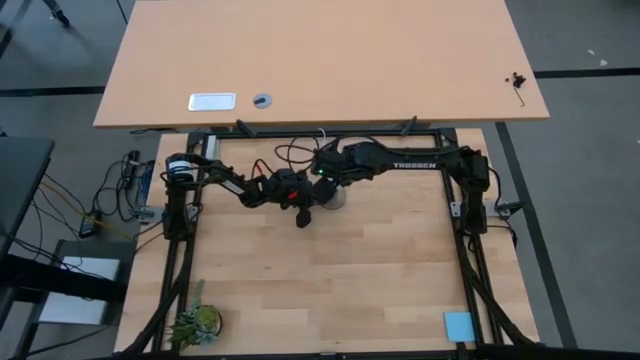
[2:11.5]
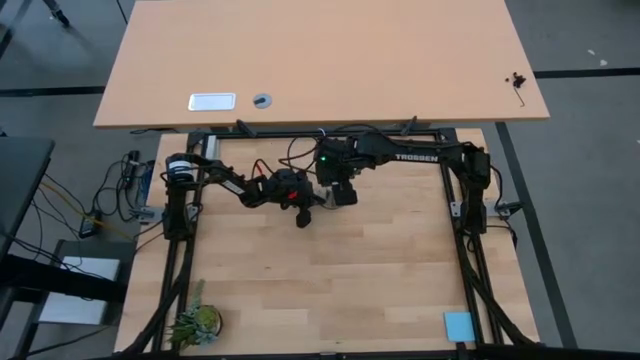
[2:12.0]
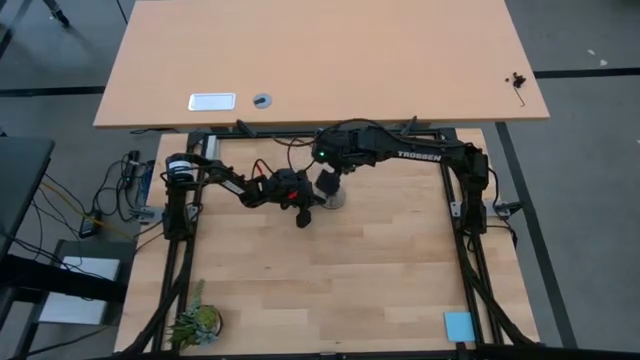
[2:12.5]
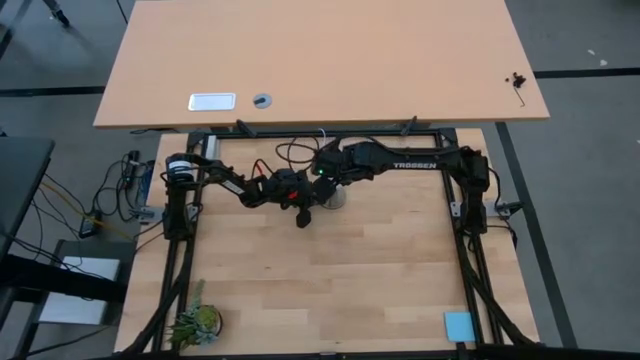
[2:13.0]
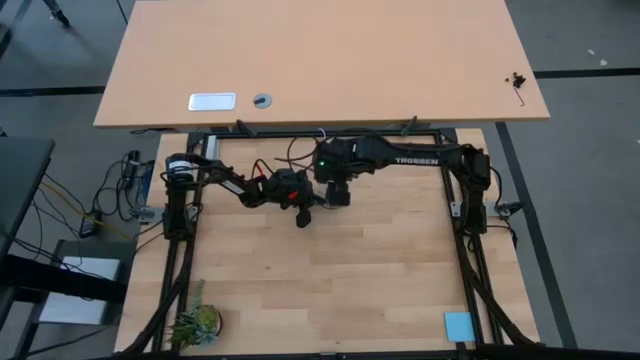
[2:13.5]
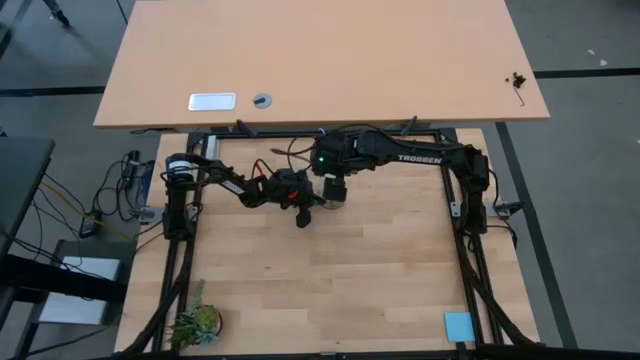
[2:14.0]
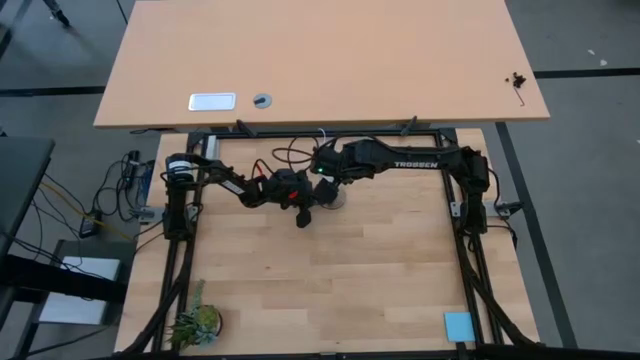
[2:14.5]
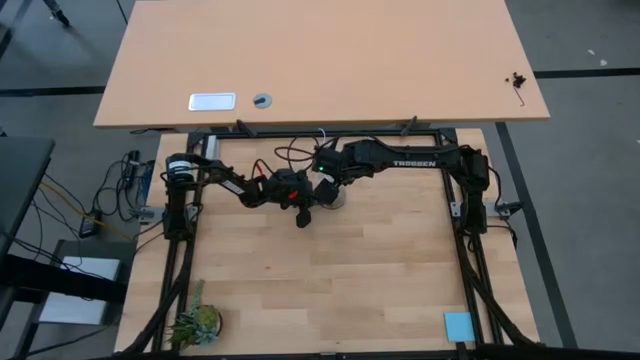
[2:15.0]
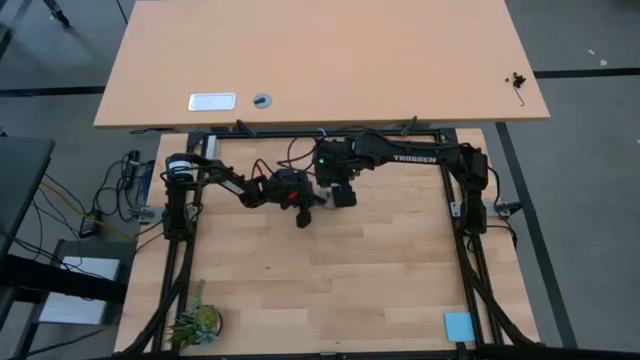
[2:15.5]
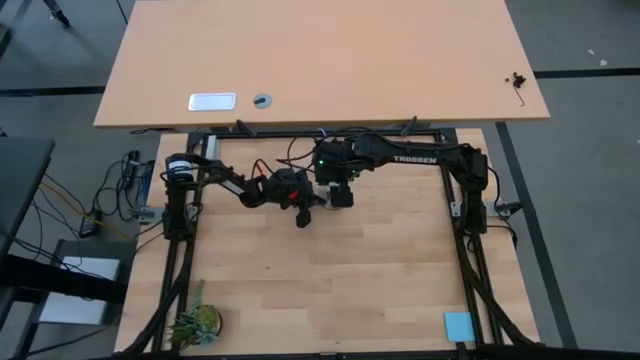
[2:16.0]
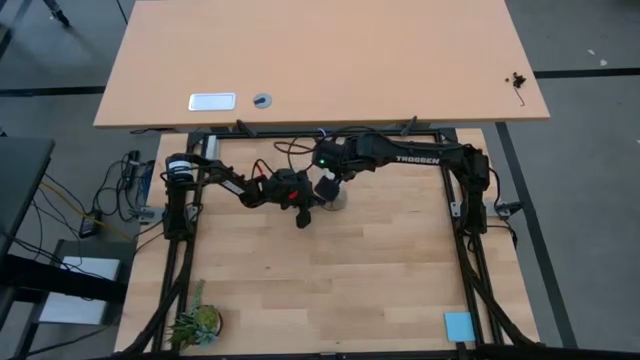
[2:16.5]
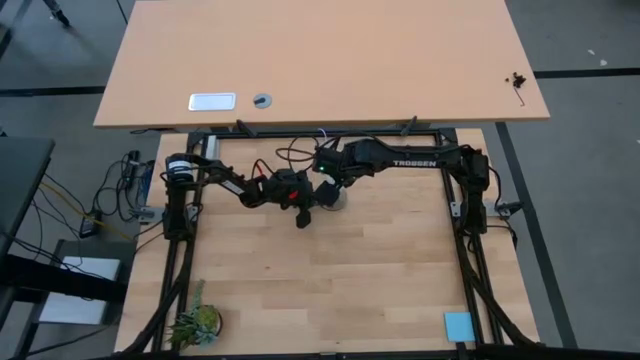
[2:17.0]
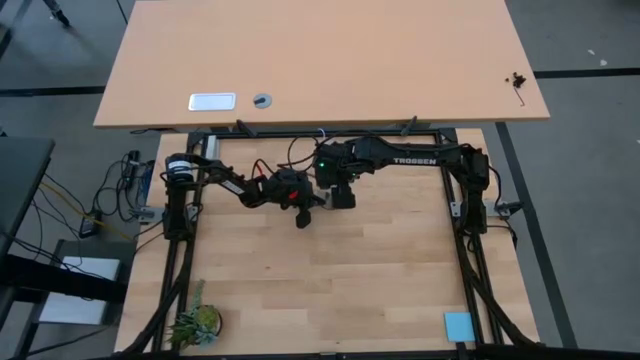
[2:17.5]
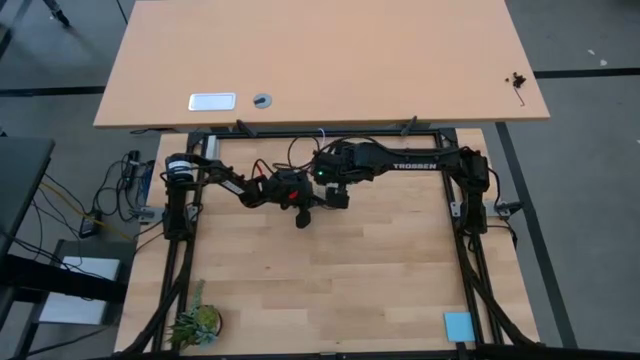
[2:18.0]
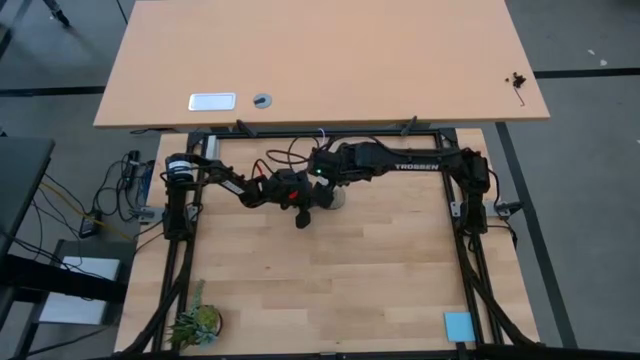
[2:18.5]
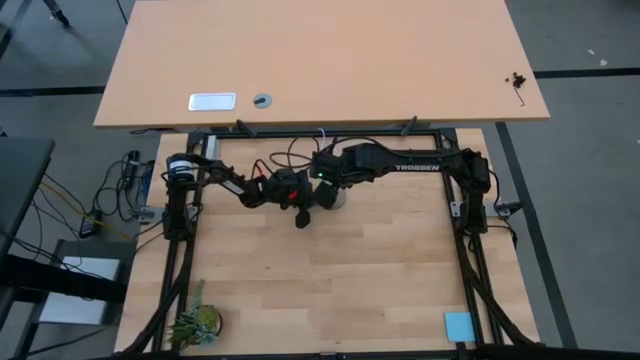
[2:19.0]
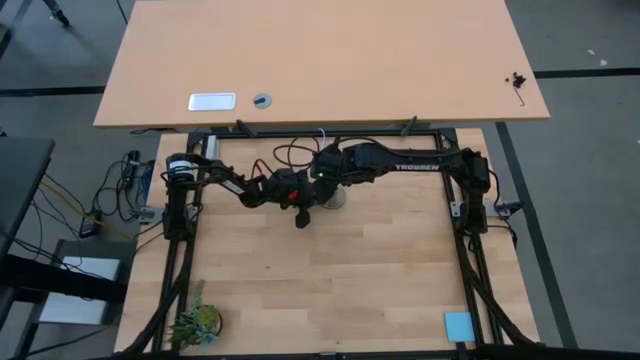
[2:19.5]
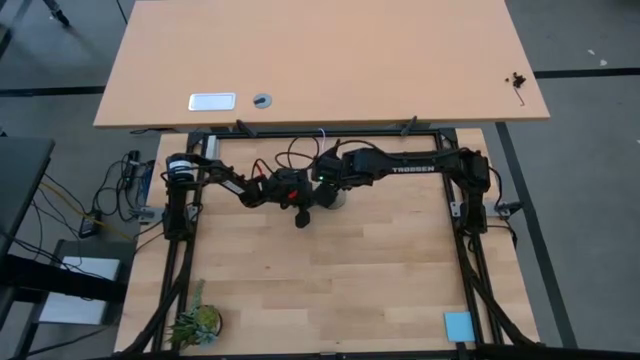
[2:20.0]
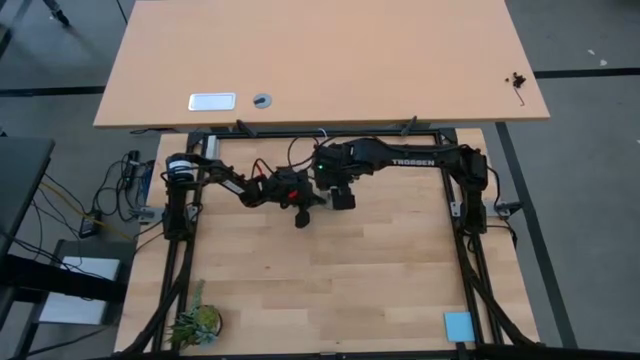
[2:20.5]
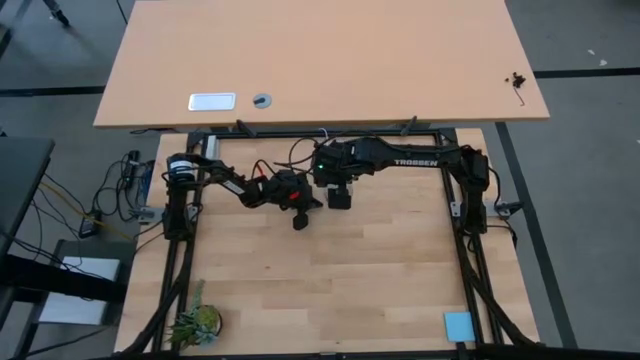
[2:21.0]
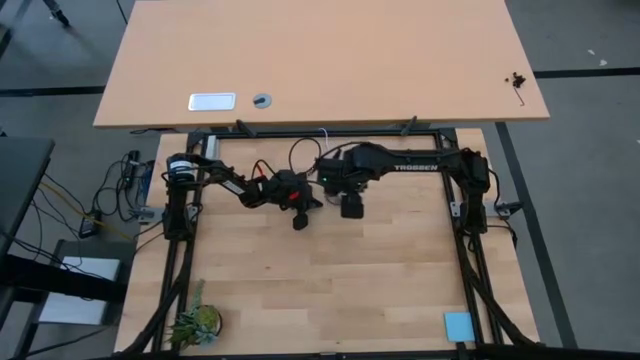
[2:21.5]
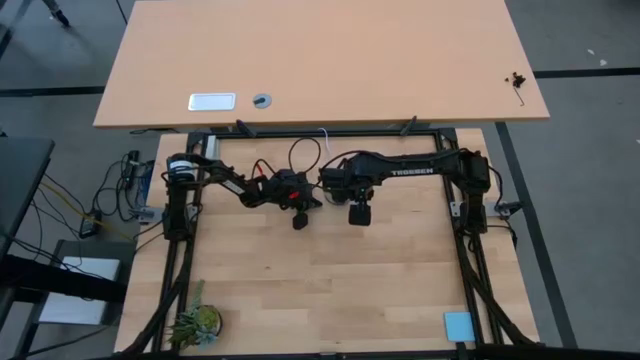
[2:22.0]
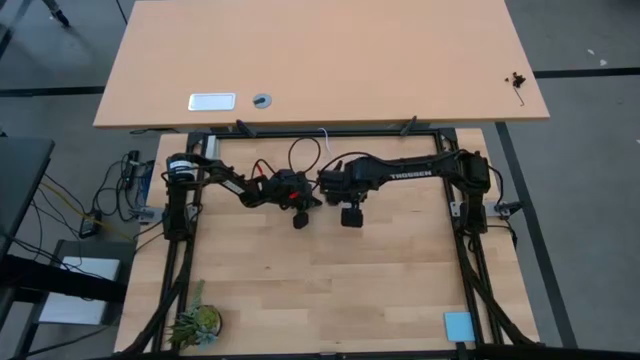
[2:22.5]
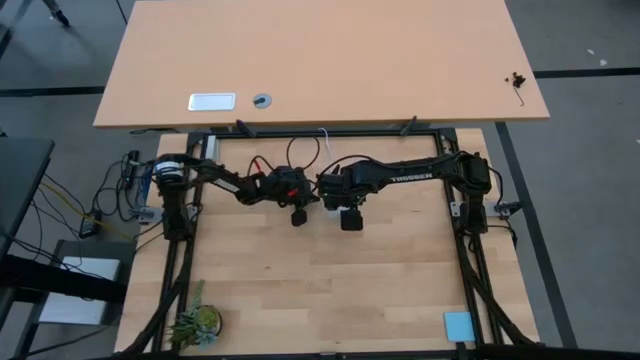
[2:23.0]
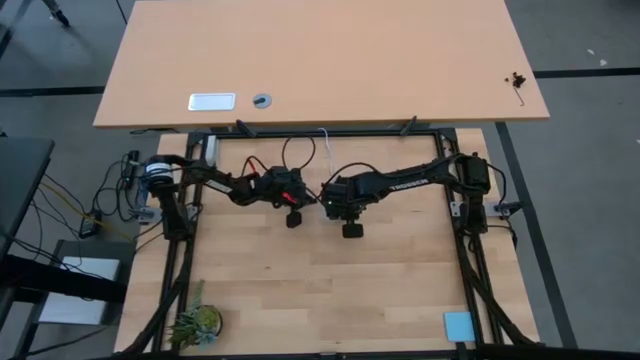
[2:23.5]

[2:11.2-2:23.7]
Task: Screw lightbulb
Remove the white lightbulb from the gold lamp

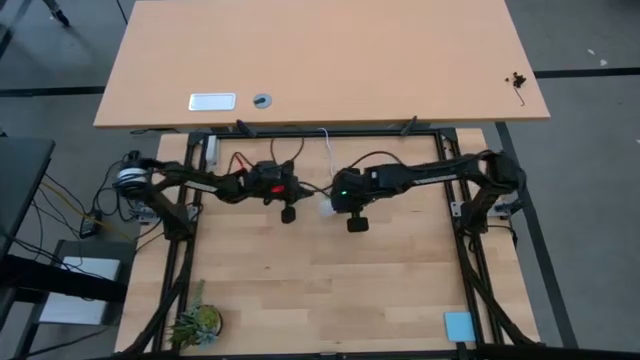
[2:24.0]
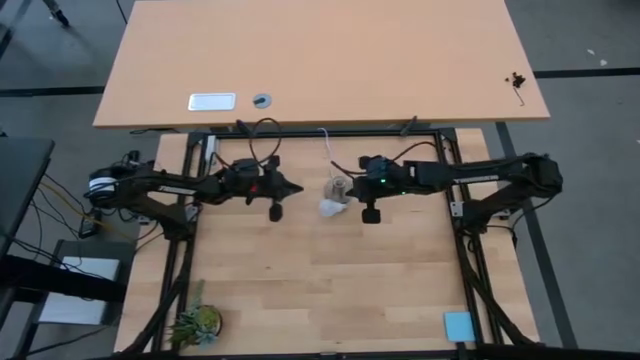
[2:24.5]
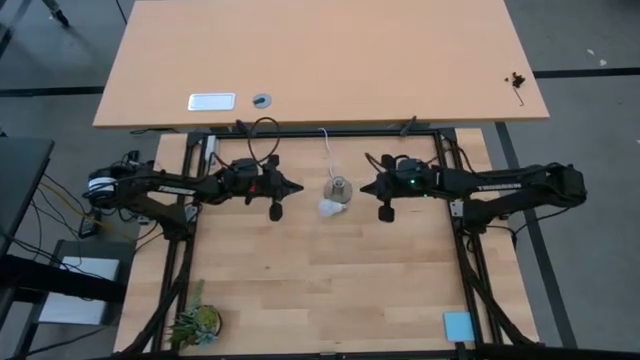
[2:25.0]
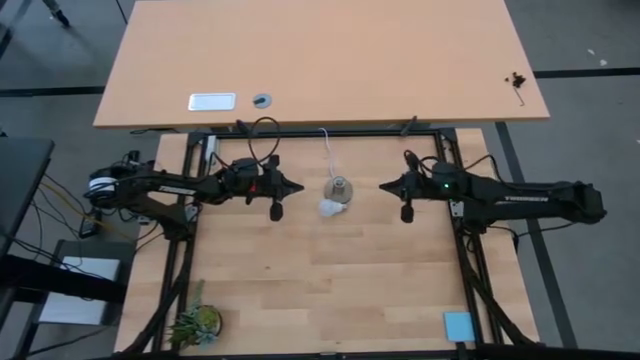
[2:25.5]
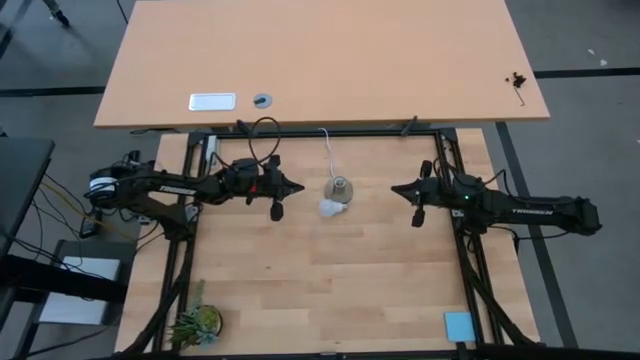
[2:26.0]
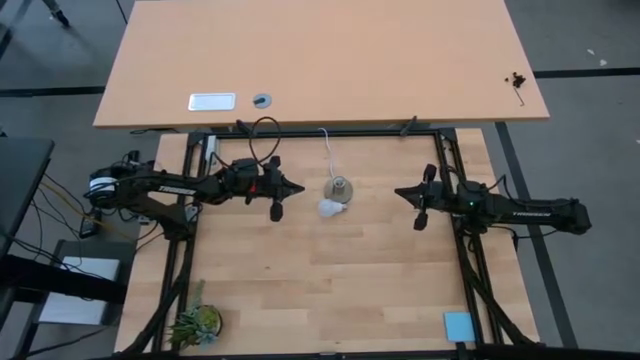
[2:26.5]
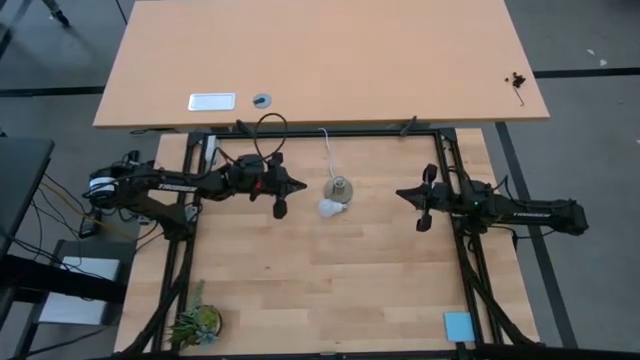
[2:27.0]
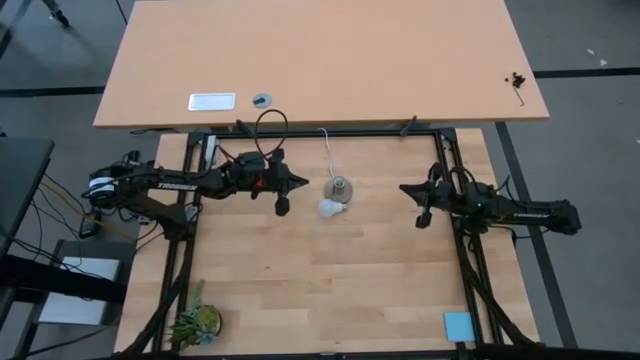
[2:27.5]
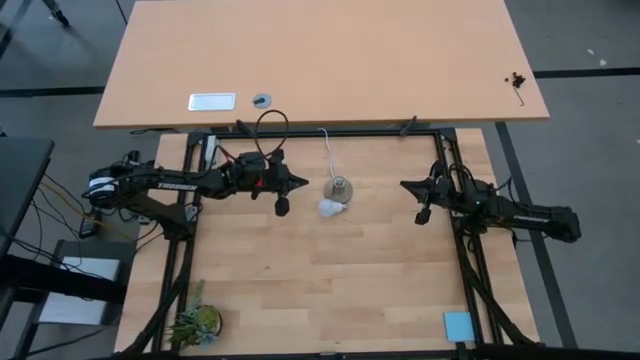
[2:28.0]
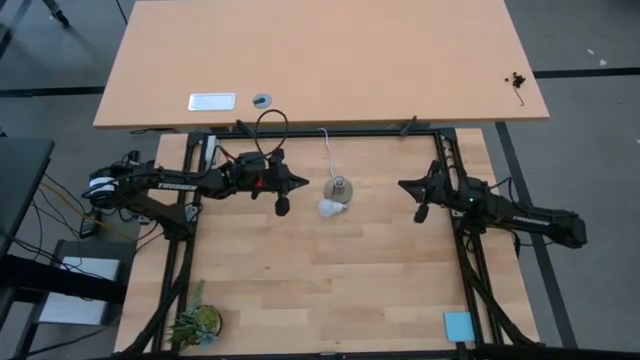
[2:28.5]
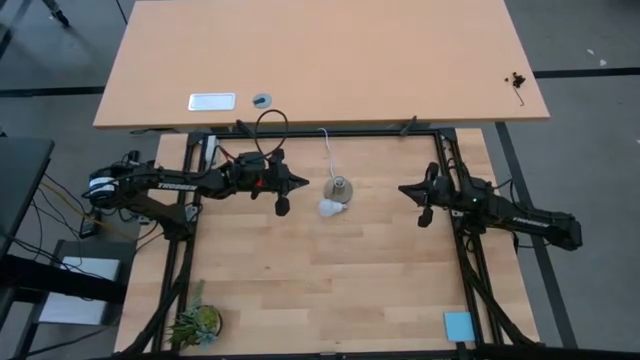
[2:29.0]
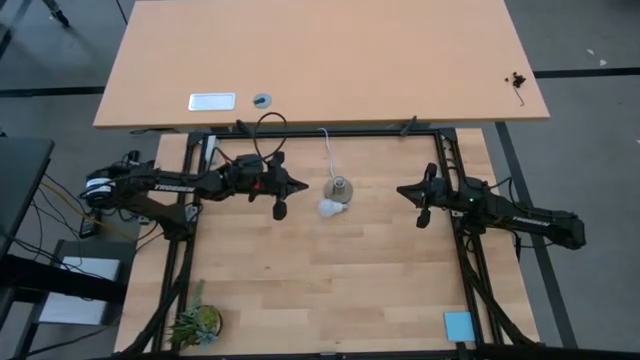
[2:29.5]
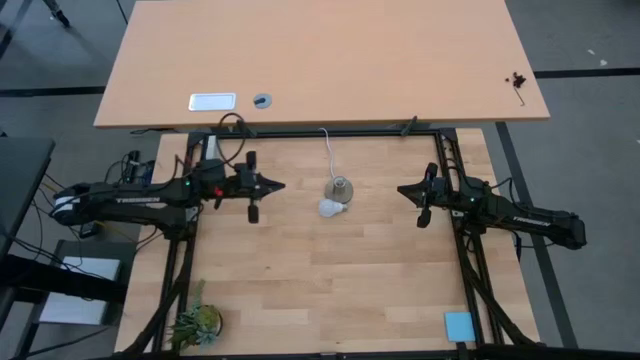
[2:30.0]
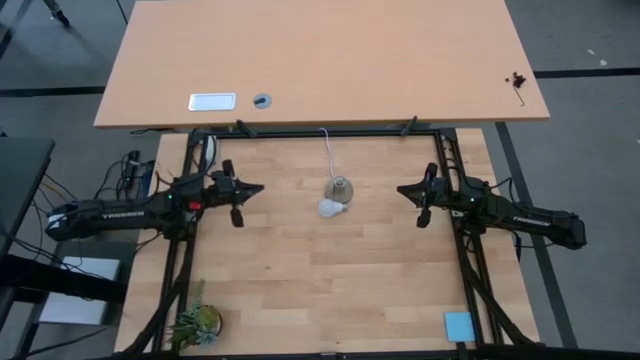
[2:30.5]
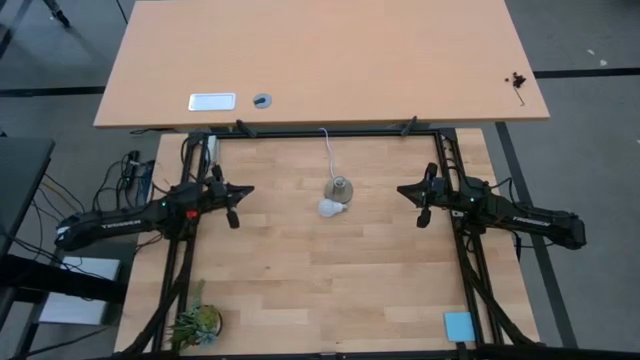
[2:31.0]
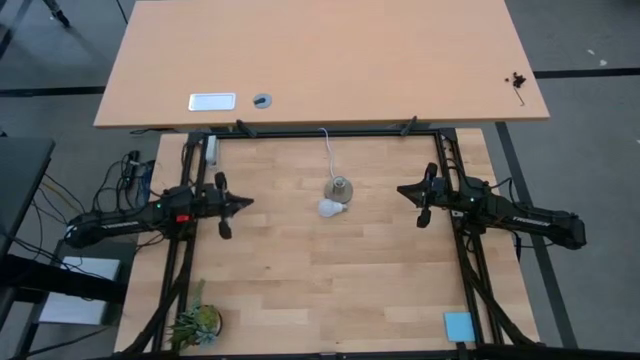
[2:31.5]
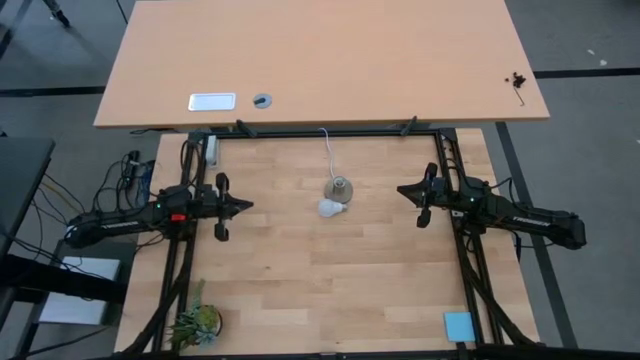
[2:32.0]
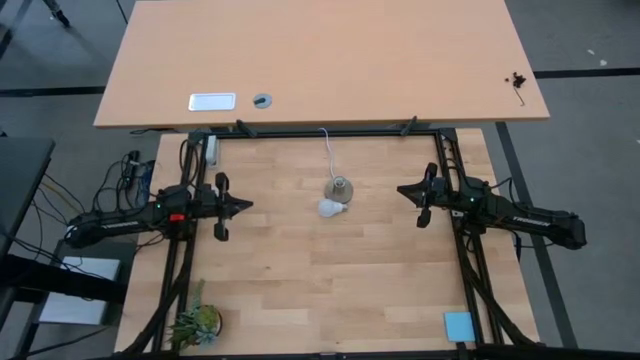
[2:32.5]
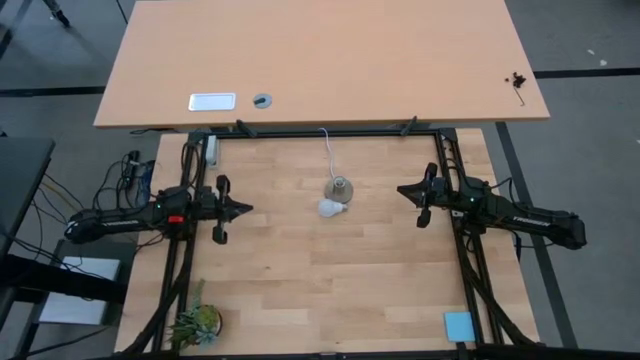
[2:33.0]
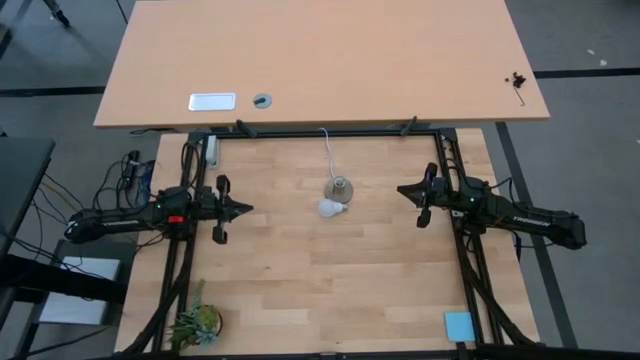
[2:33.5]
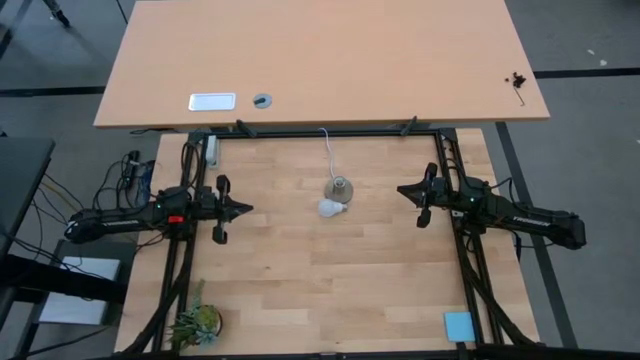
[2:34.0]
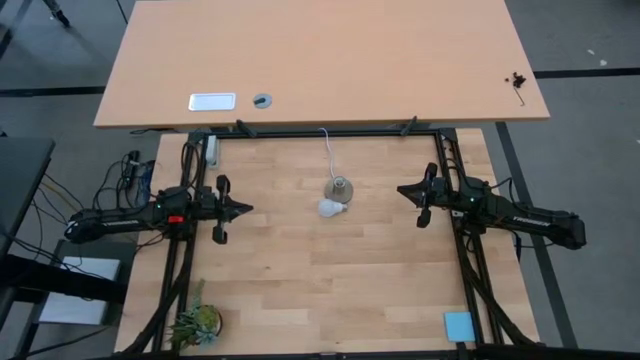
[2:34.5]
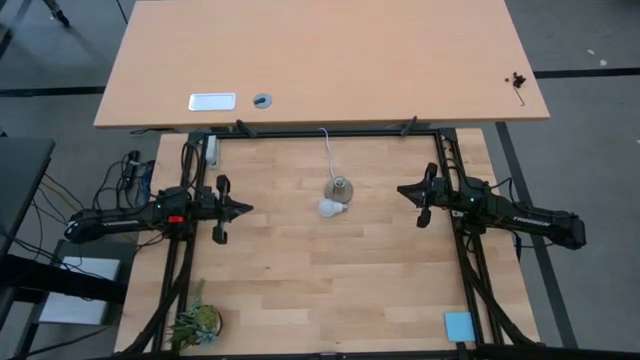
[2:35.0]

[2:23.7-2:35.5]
Return to Home Position
